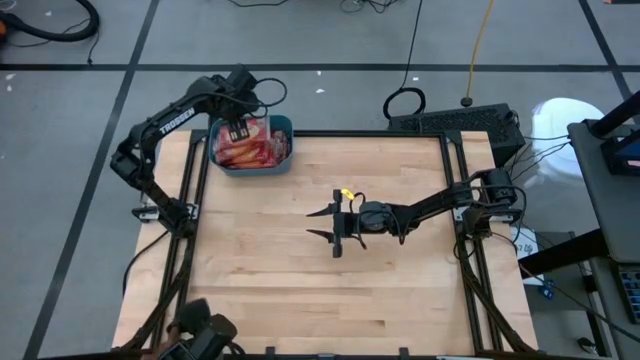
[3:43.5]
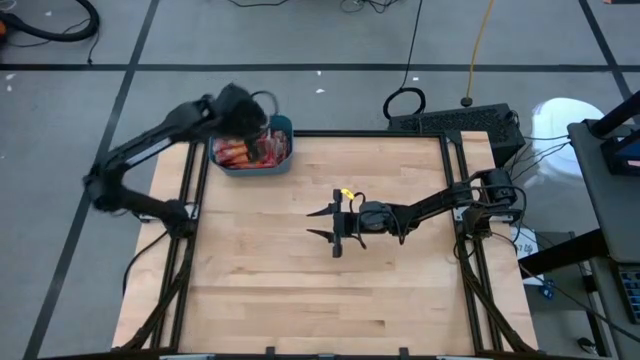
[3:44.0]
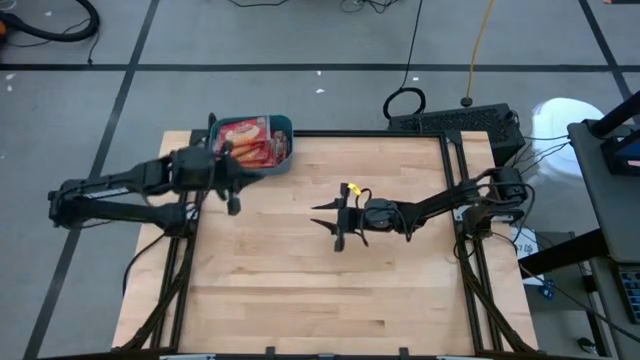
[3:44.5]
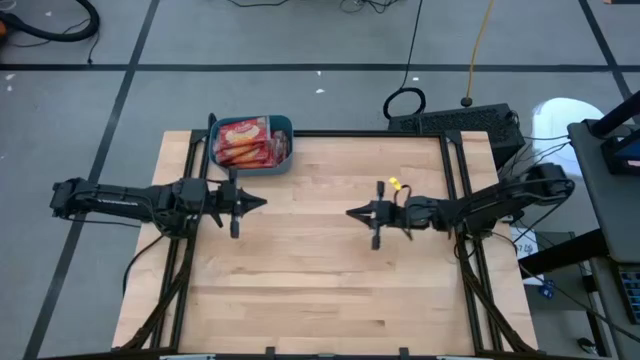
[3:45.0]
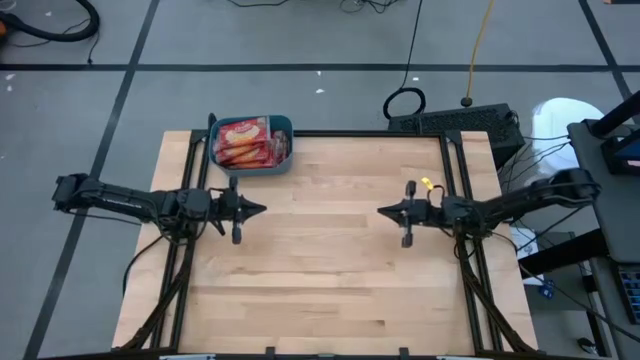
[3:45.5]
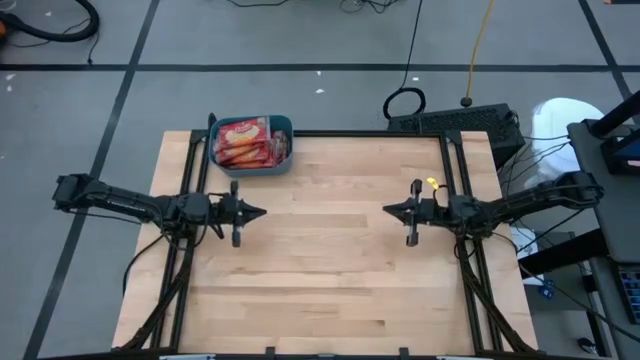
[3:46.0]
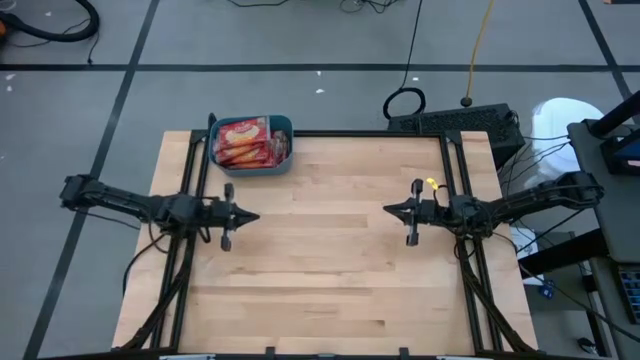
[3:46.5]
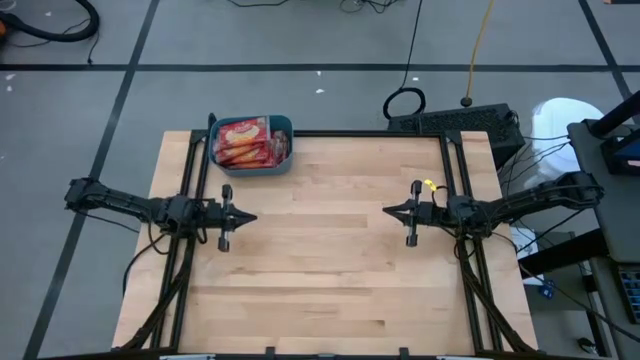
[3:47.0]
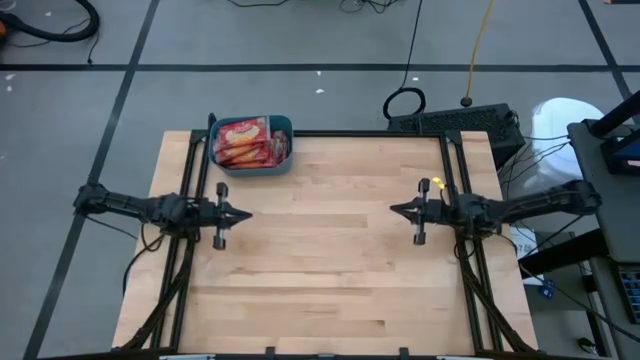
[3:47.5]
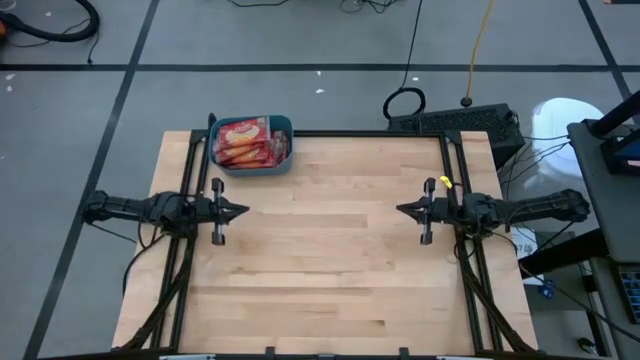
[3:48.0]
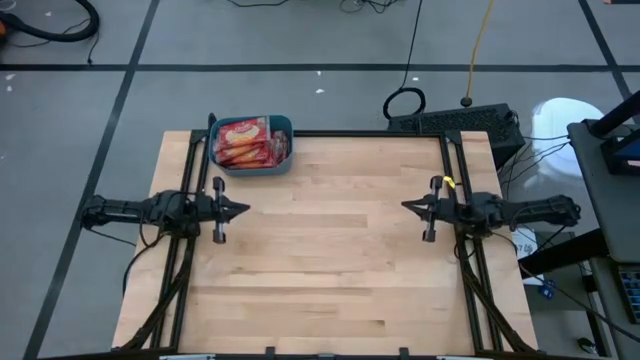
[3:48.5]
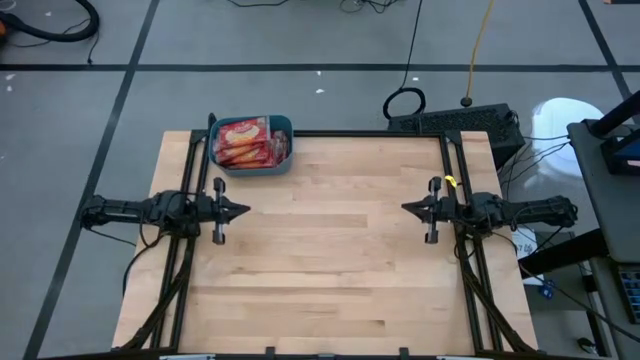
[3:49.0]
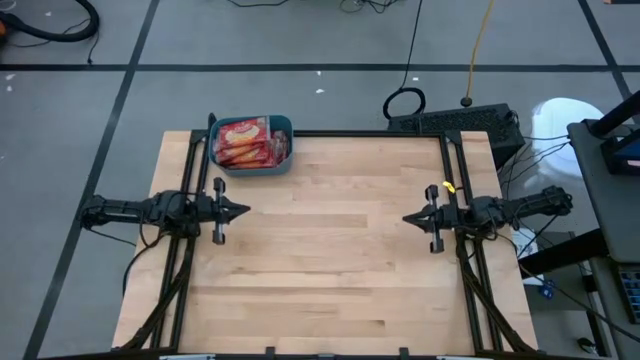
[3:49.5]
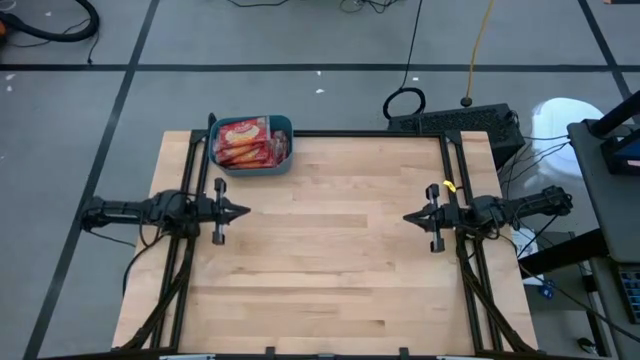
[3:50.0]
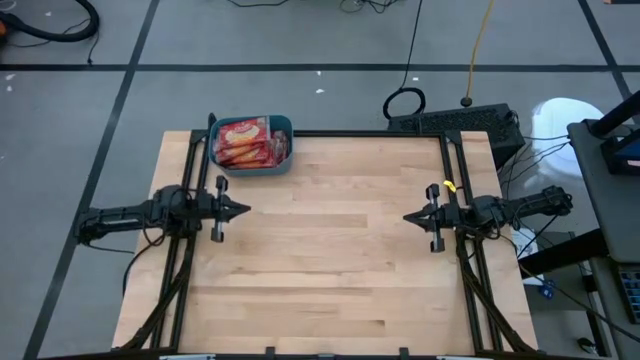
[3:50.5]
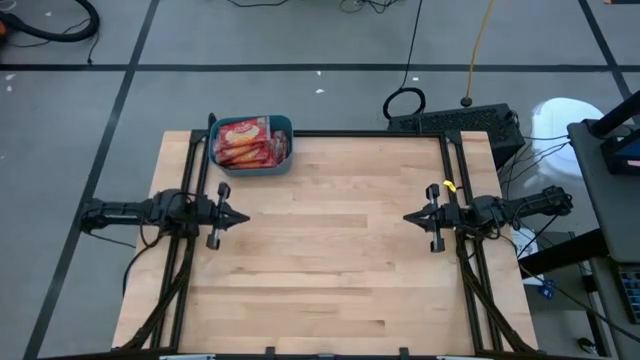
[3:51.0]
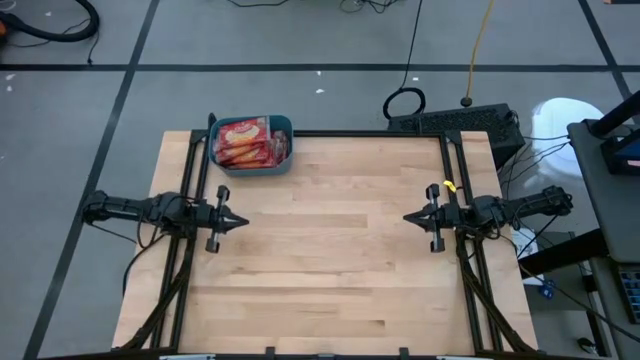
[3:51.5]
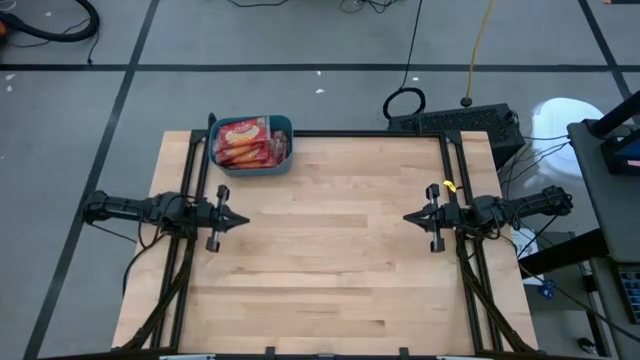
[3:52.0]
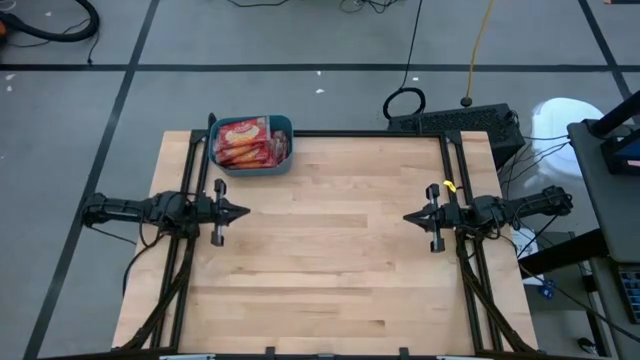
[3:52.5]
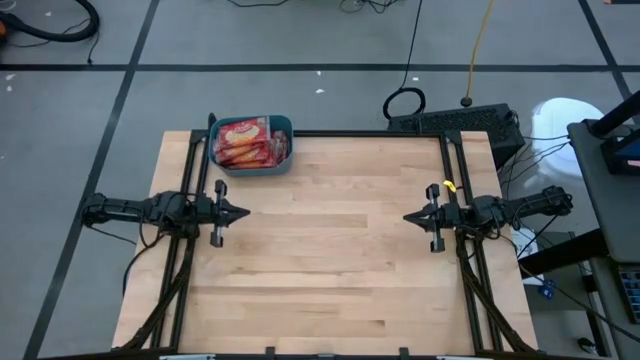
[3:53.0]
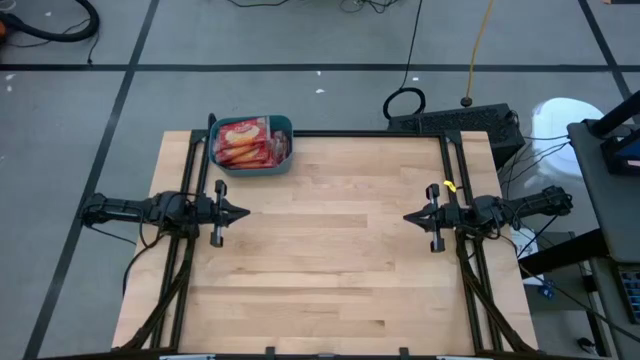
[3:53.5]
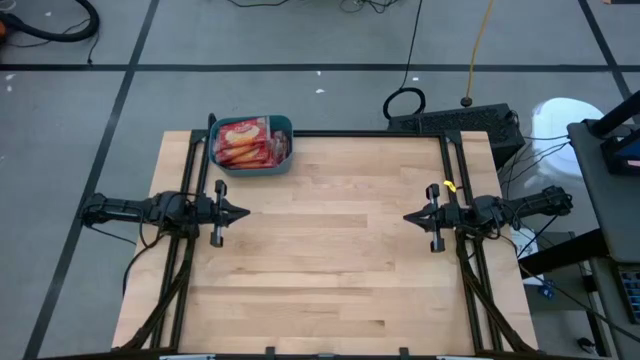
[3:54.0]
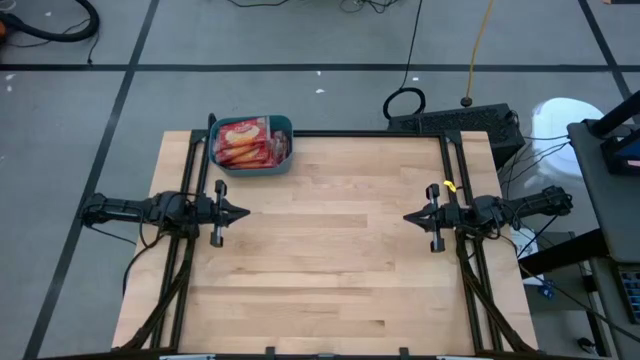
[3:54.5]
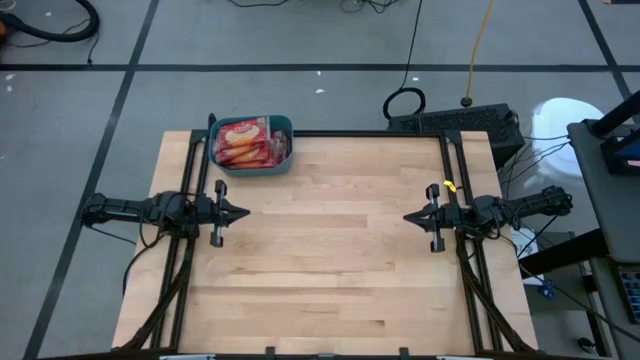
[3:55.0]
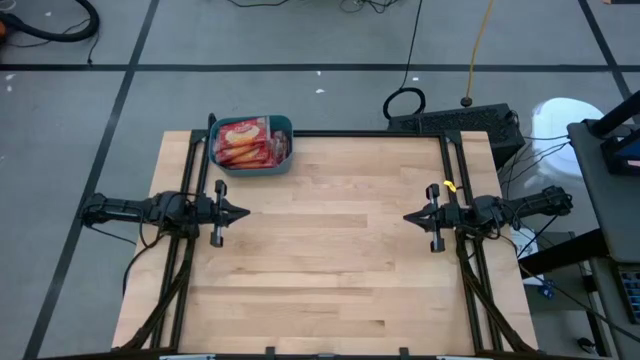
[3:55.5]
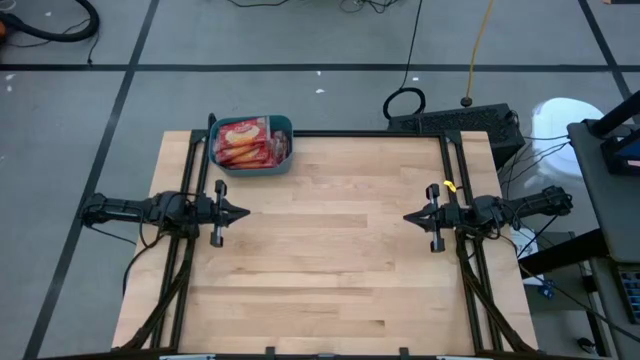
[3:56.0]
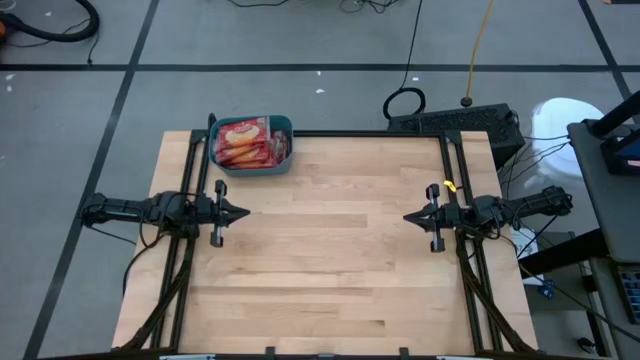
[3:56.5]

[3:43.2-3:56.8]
Task: Sort popcorn bags into baskets
Return to Home Position

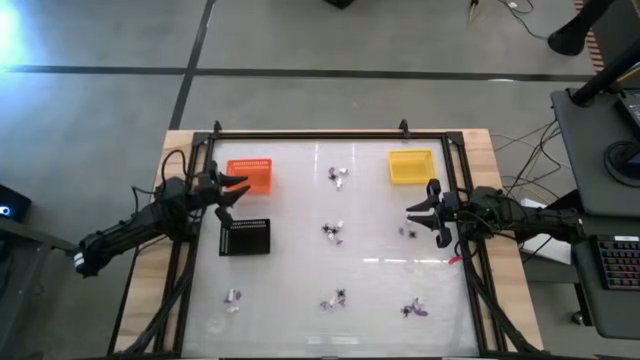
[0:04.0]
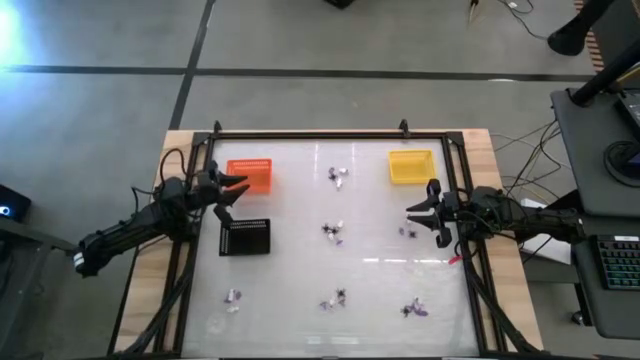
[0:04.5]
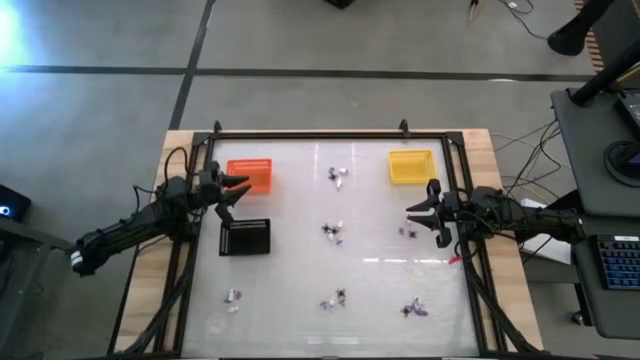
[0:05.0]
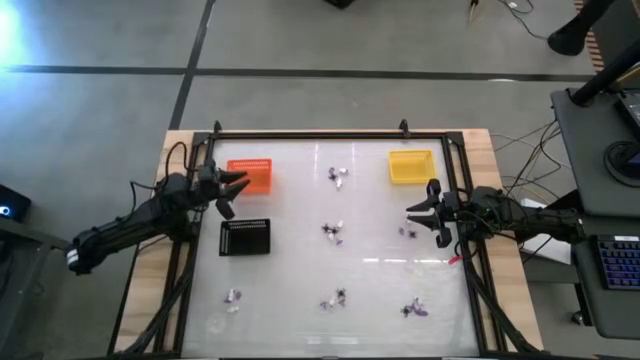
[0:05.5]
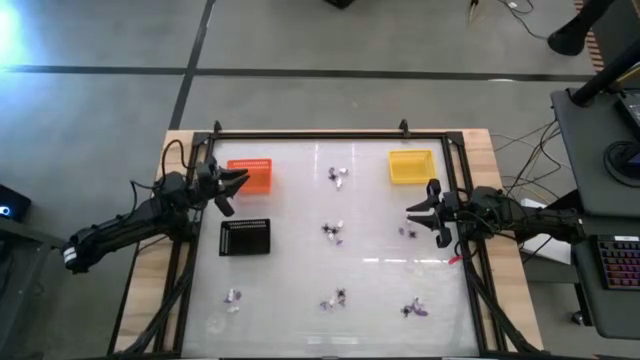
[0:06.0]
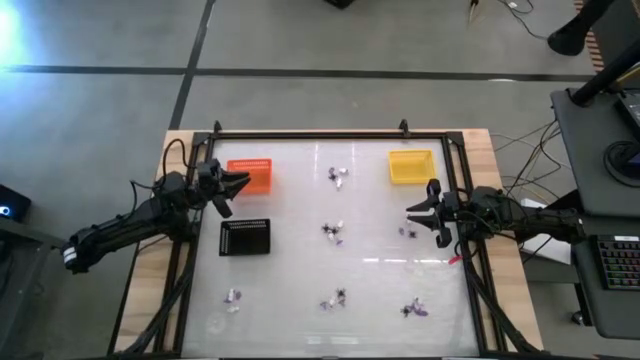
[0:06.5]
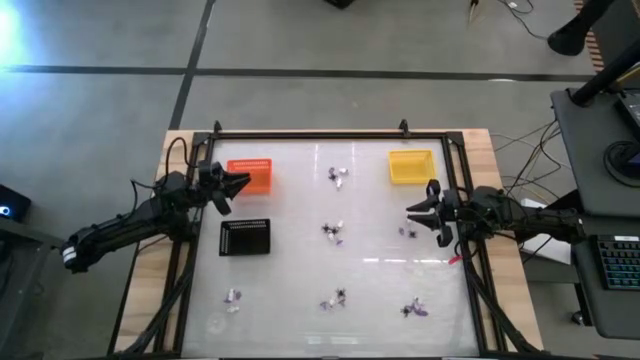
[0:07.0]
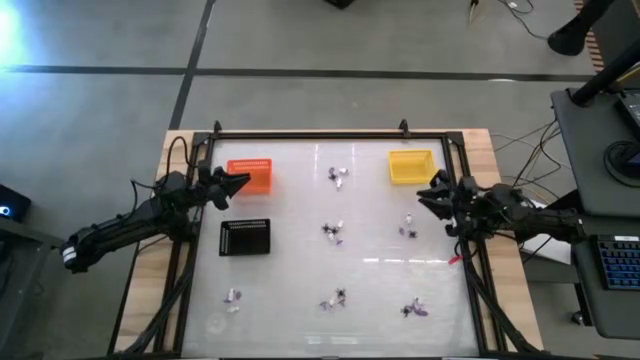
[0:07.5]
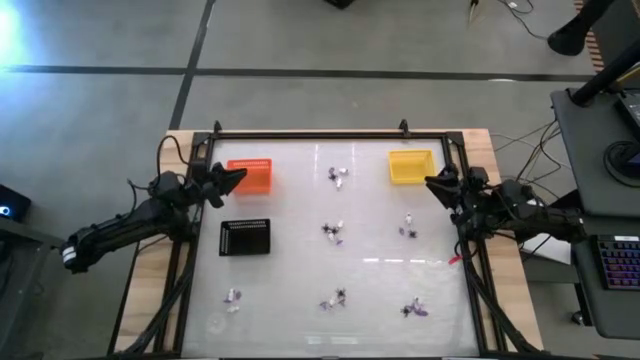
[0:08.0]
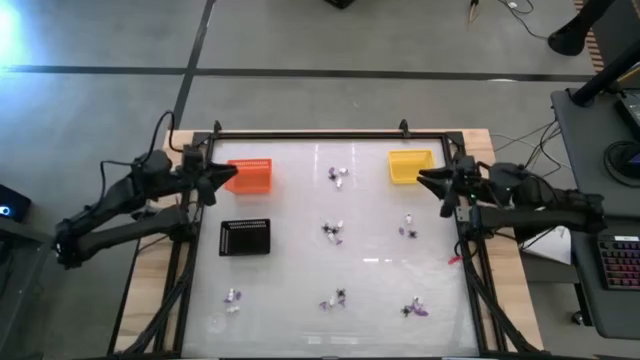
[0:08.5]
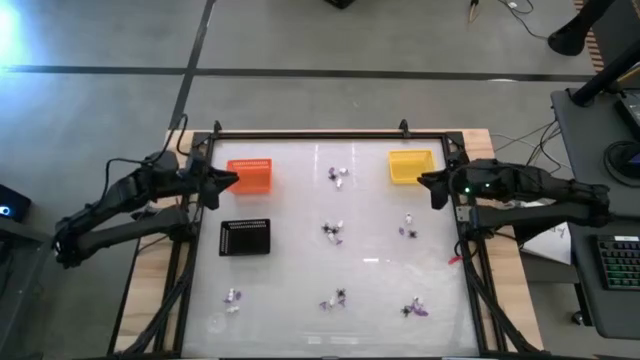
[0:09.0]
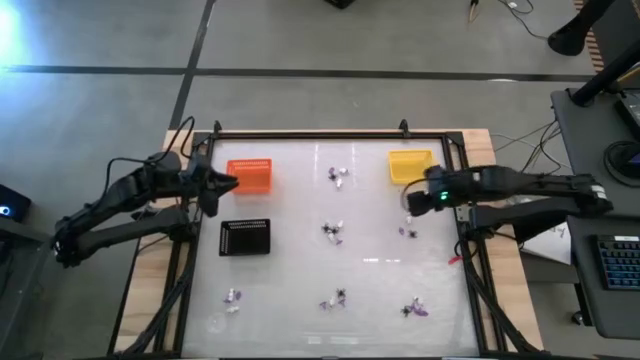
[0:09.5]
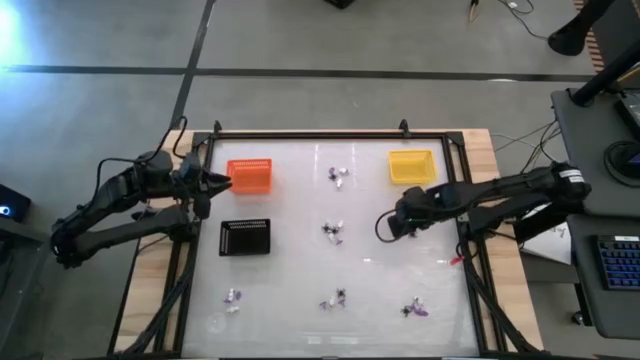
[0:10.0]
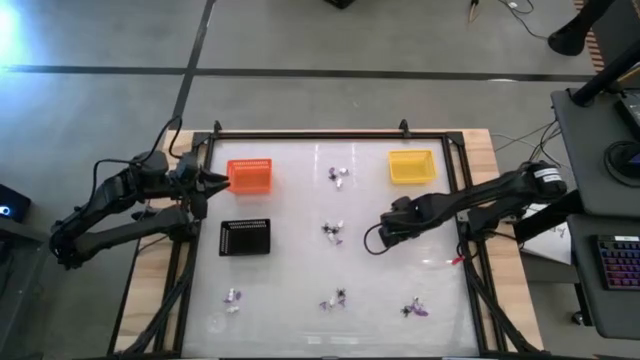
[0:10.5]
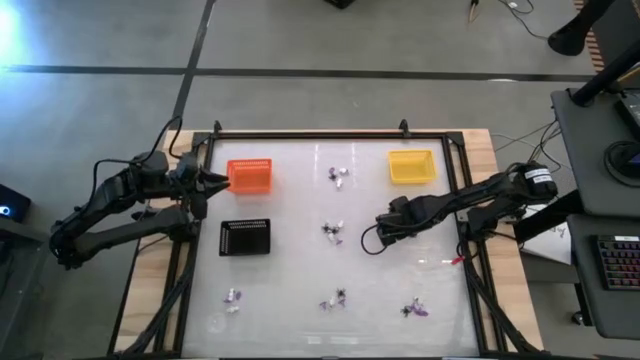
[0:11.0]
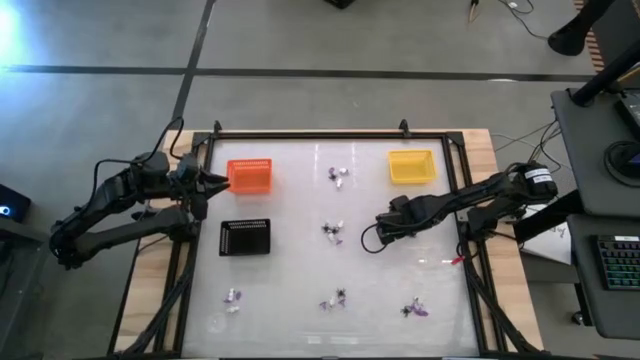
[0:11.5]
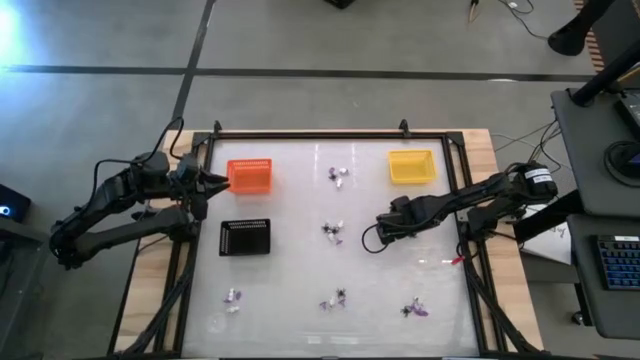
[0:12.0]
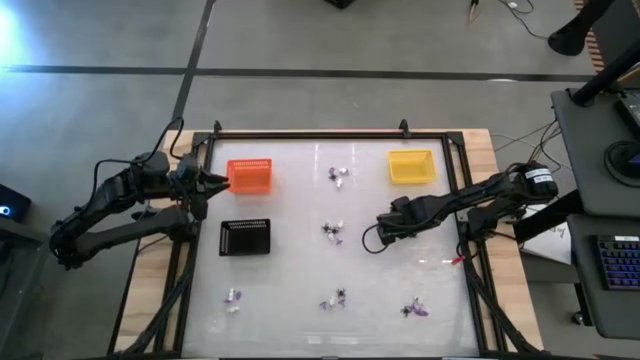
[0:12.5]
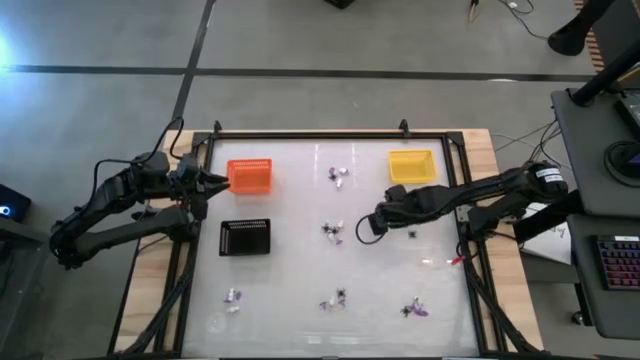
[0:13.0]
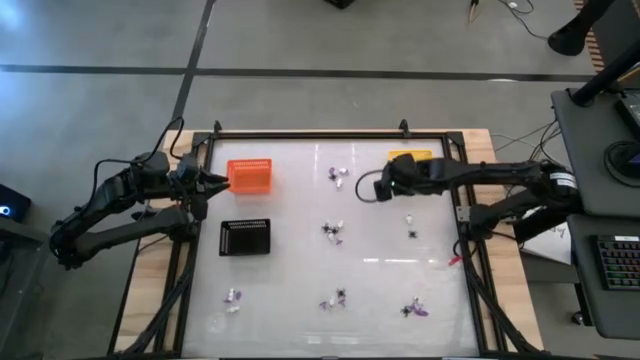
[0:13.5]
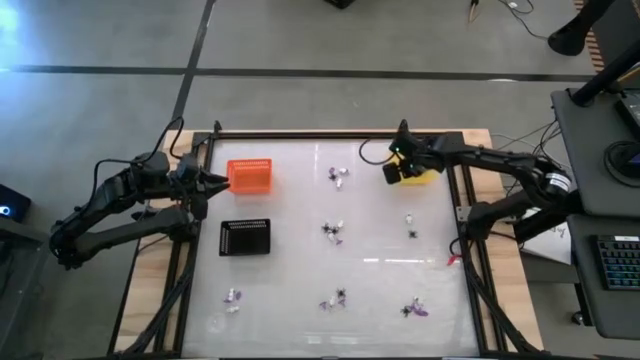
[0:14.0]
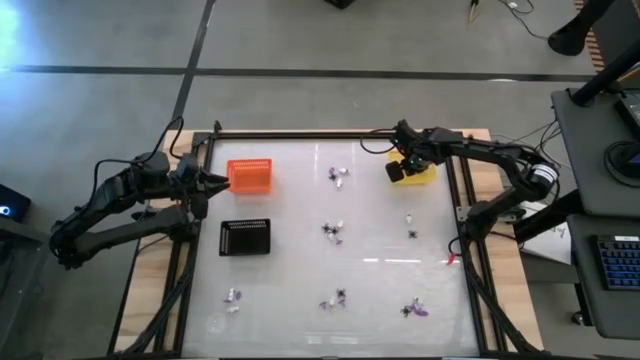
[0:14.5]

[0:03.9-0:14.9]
Task: Sort Halloween decoration
Put the purple witch hat toy into the yellow bin
